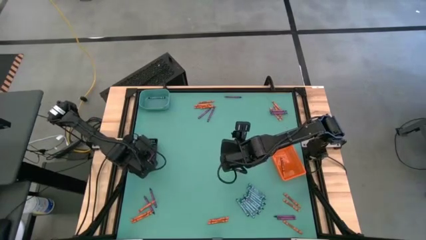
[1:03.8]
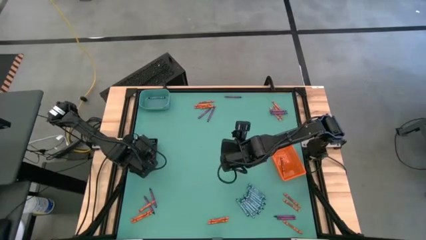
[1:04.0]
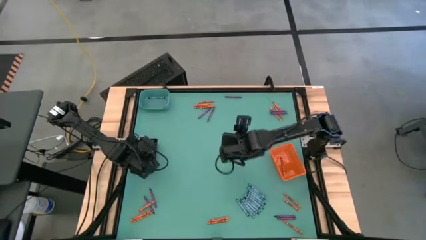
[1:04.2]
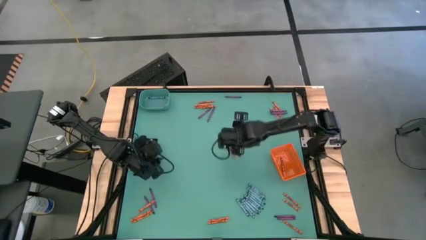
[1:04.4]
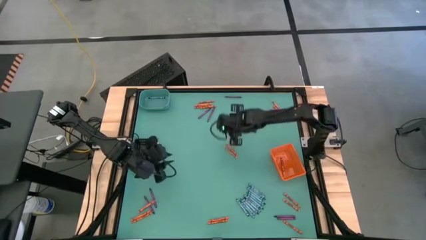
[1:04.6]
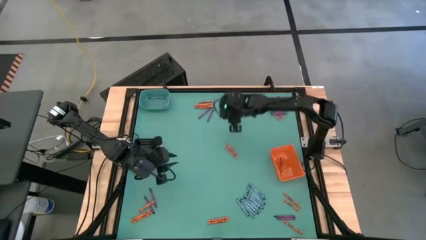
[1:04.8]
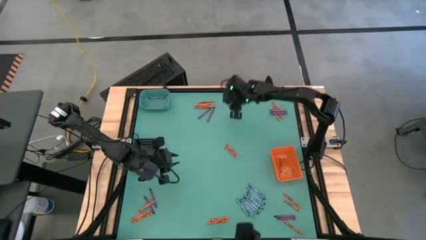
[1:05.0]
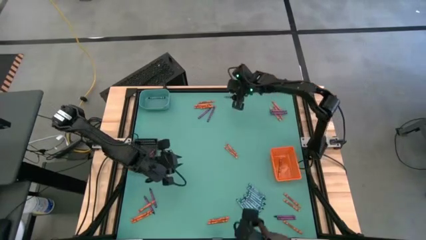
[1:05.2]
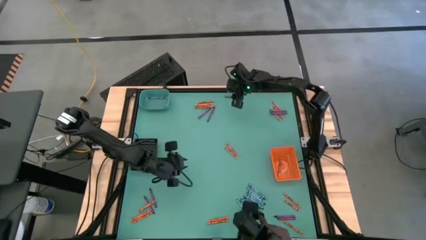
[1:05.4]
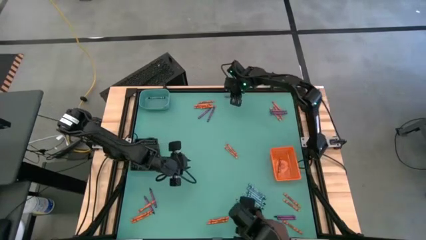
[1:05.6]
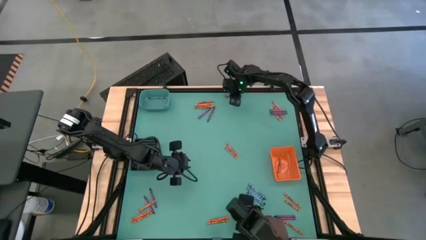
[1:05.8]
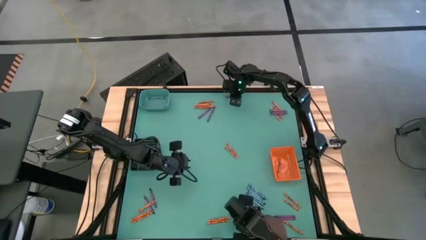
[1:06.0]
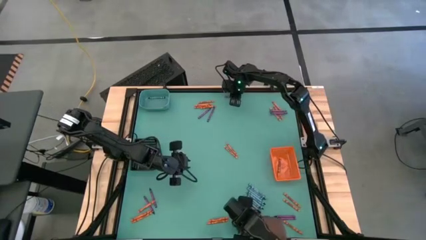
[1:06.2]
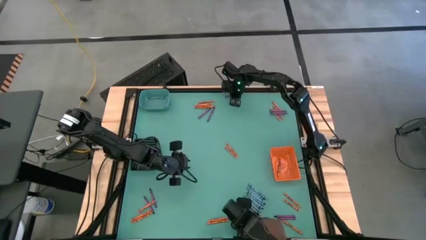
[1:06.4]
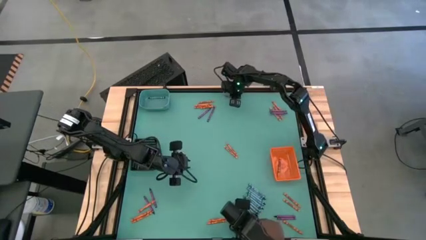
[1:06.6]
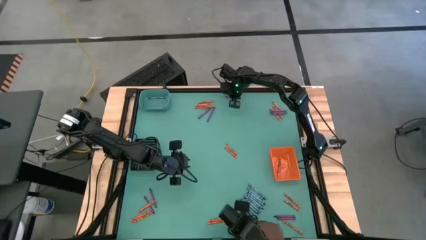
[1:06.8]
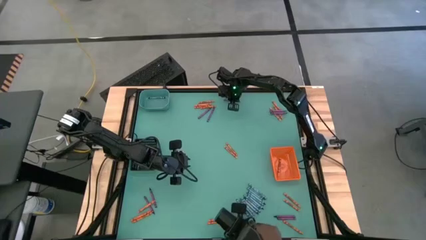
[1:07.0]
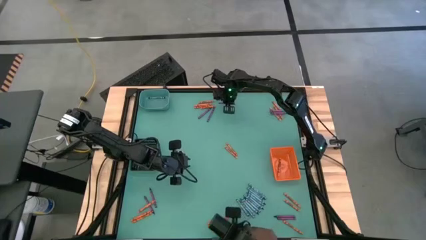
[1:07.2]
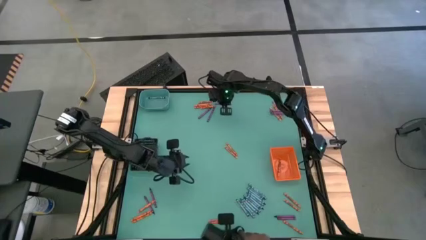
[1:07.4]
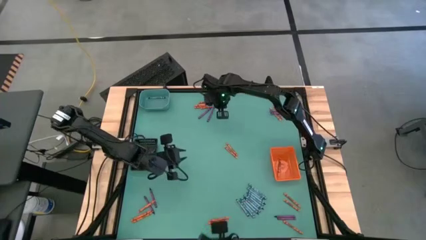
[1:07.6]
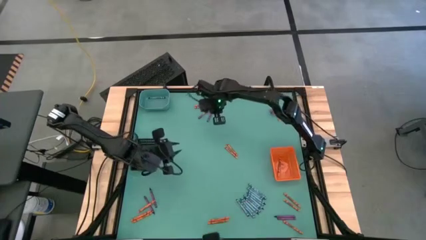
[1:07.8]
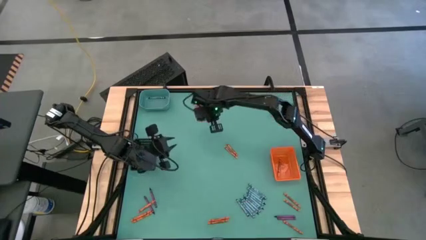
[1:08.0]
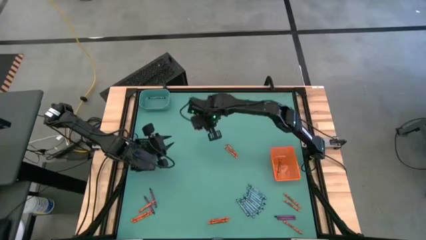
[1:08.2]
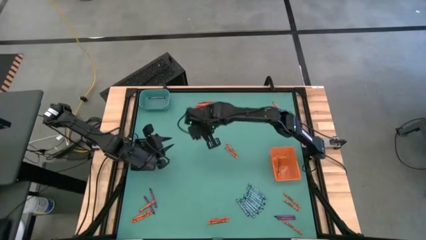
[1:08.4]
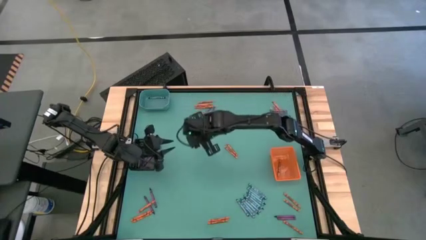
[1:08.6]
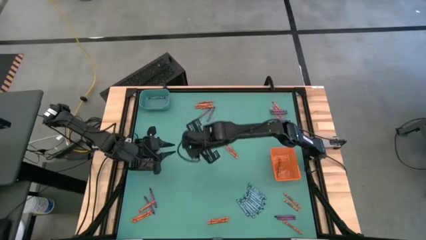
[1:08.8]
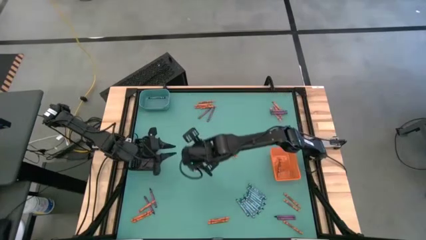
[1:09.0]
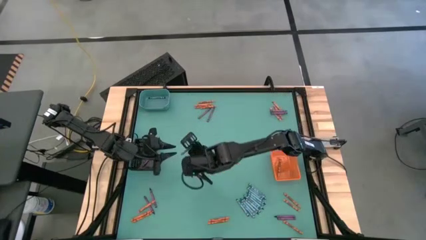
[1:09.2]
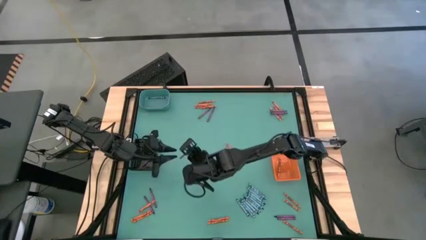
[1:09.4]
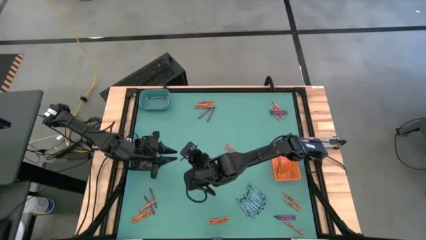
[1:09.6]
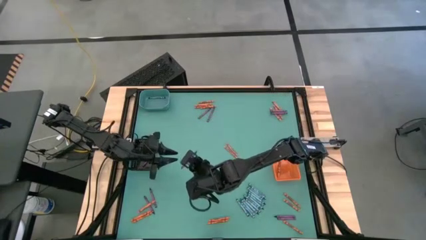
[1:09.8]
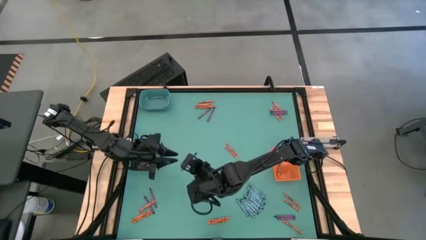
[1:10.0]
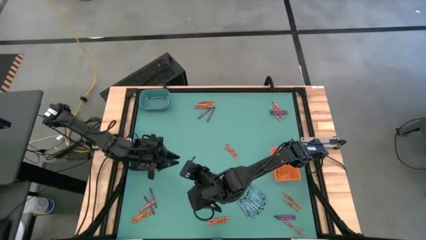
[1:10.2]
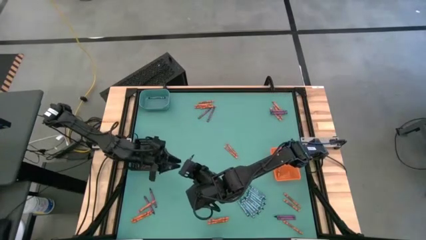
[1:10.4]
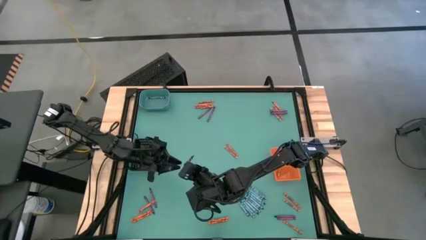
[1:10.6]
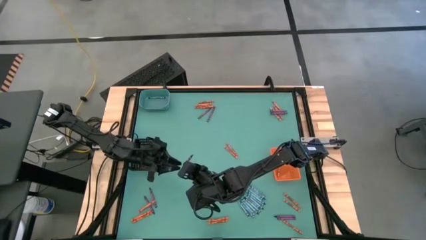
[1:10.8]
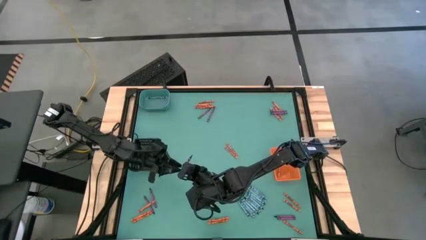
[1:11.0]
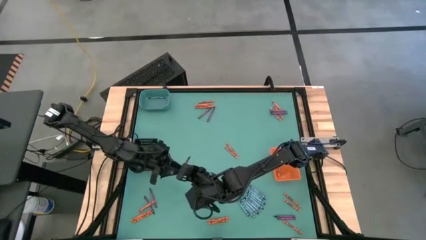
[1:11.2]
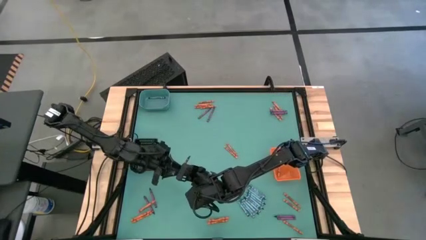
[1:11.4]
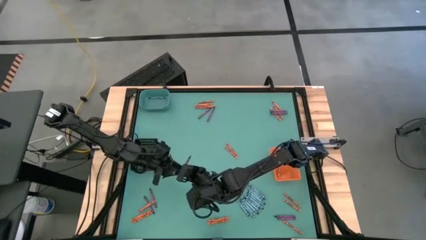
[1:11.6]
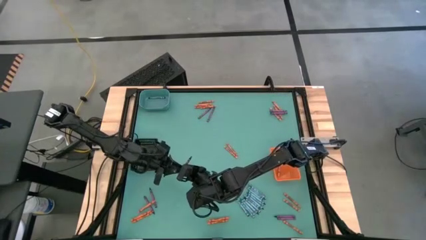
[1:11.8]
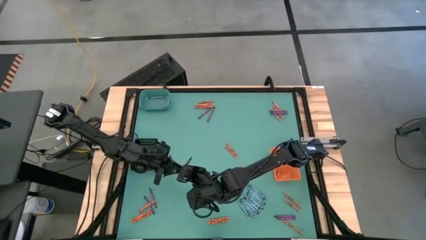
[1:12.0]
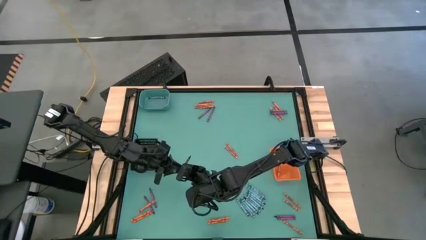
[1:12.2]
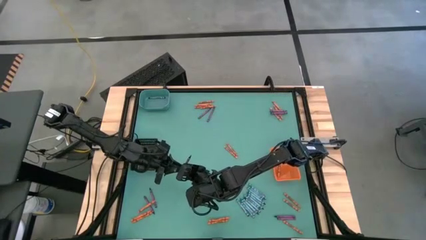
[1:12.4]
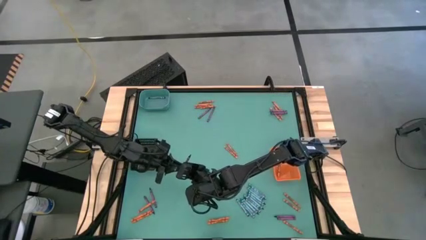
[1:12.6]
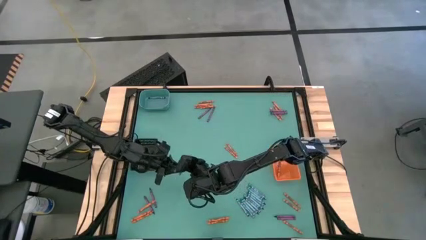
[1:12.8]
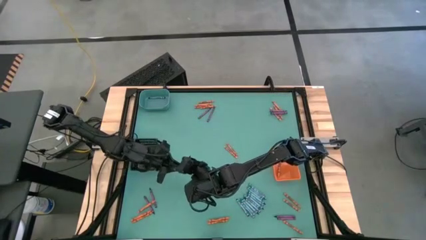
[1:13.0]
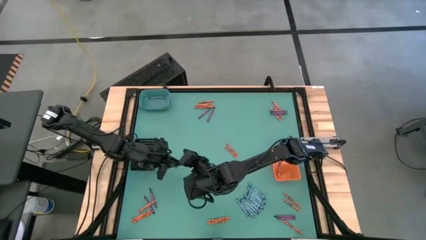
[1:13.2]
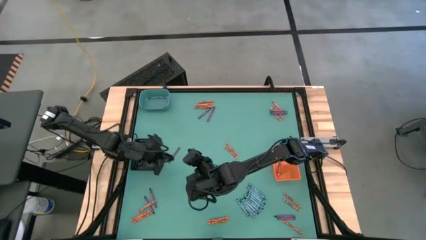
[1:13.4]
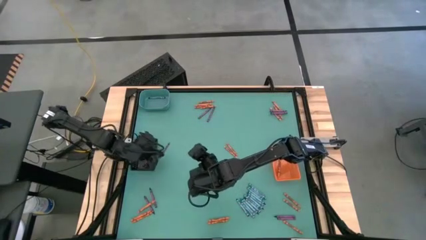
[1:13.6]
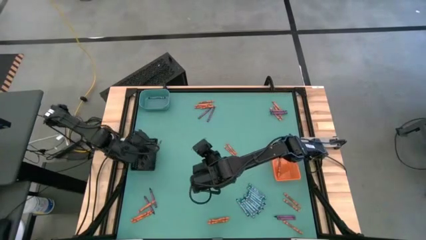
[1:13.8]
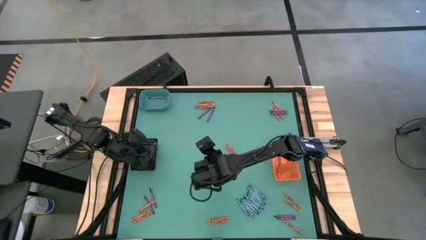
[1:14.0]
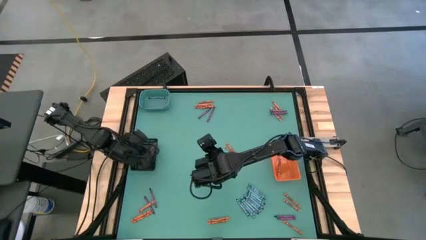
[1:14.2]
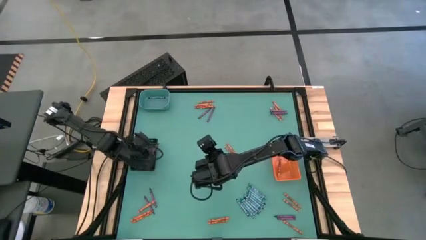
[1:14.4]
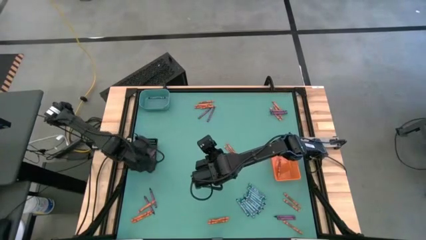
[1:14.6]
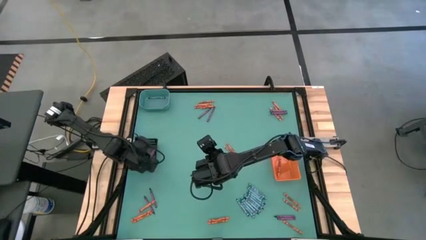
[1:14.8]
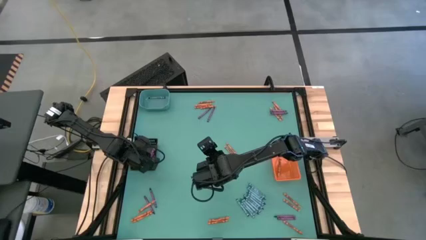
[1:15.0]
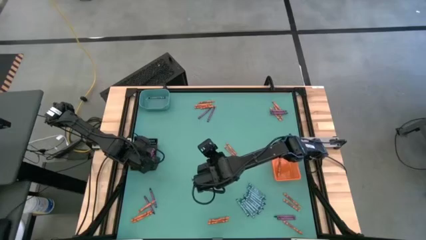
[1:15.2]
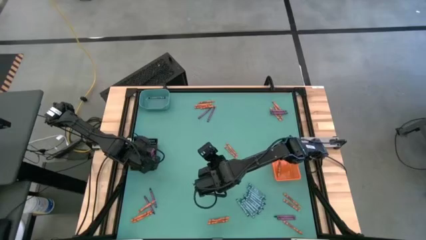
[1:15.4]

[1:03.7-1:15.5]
Task: Sort crayons
Put the purple crayon into the black bin

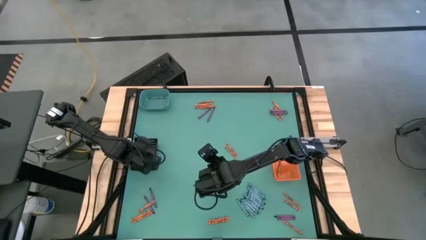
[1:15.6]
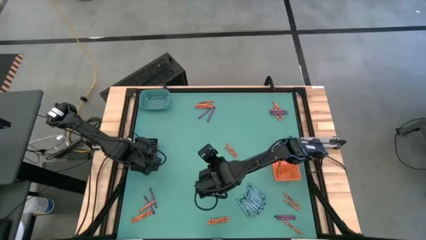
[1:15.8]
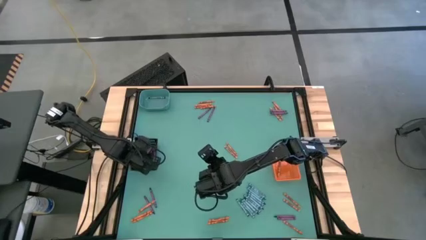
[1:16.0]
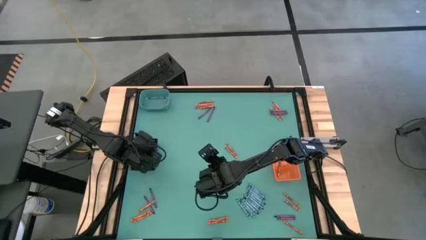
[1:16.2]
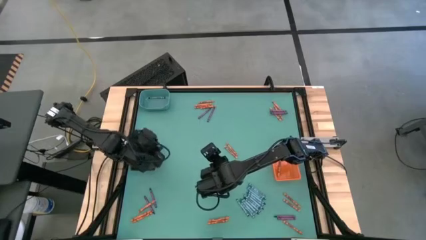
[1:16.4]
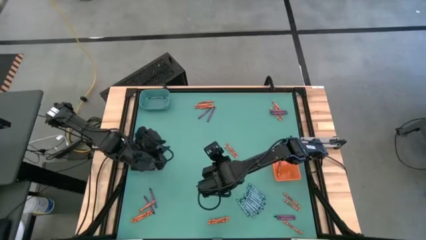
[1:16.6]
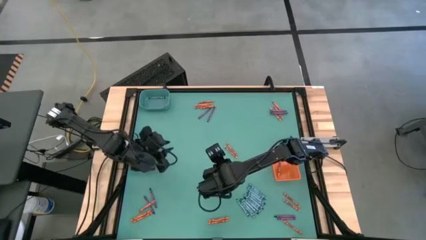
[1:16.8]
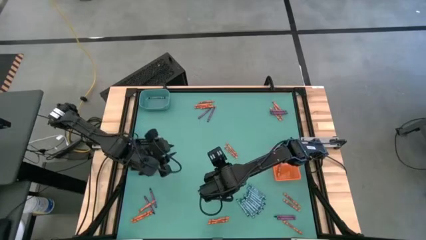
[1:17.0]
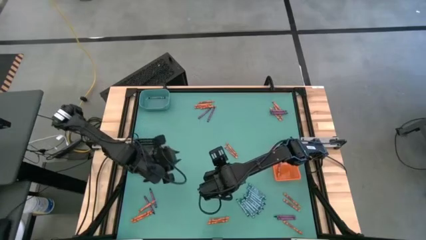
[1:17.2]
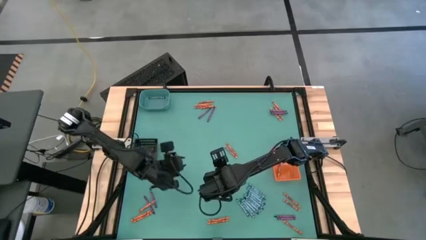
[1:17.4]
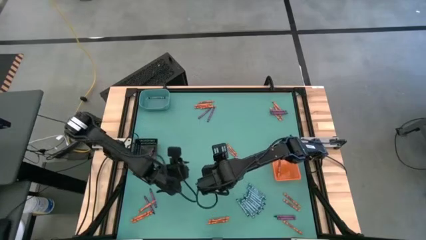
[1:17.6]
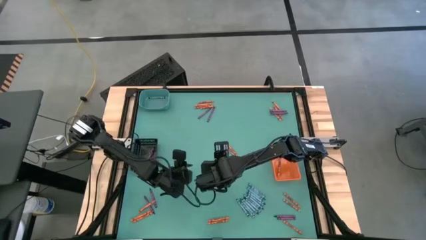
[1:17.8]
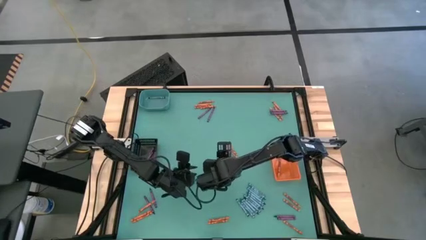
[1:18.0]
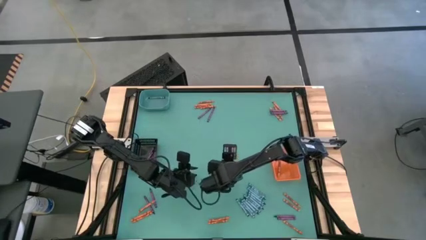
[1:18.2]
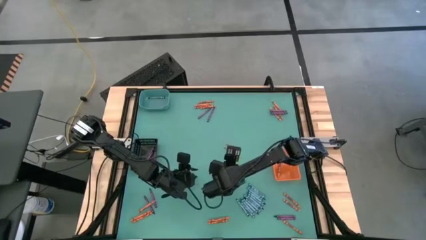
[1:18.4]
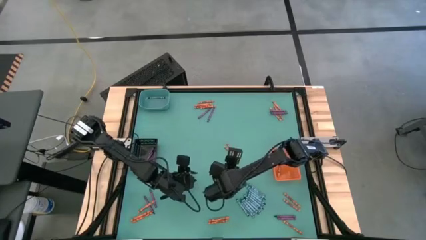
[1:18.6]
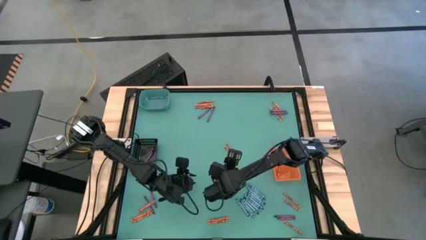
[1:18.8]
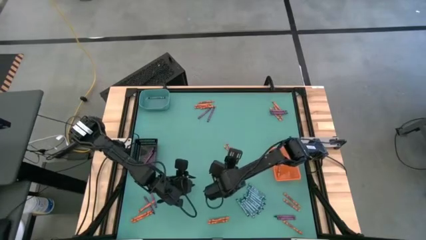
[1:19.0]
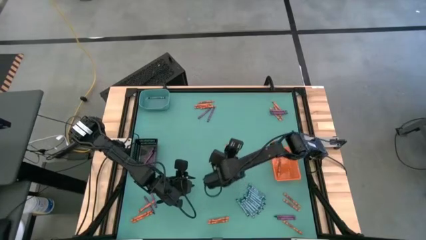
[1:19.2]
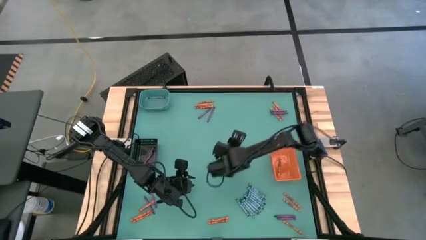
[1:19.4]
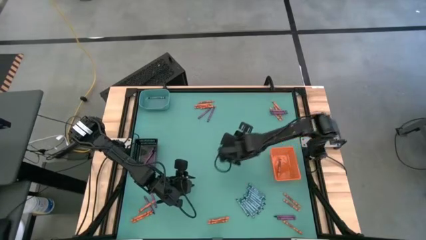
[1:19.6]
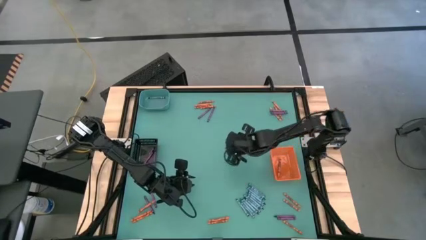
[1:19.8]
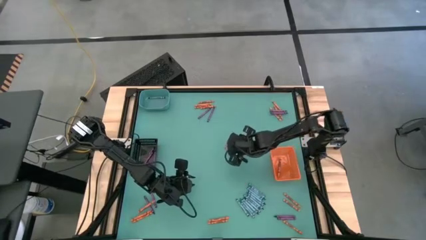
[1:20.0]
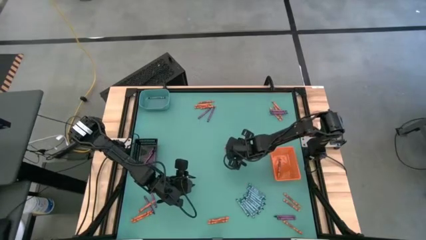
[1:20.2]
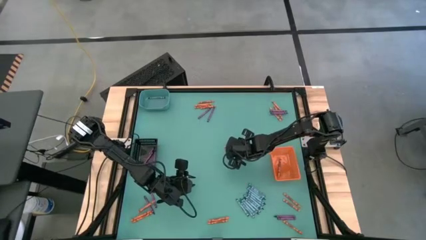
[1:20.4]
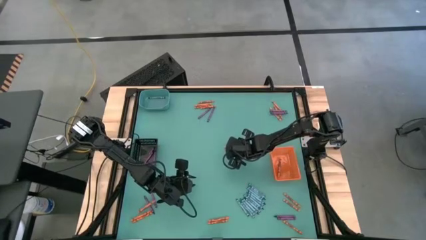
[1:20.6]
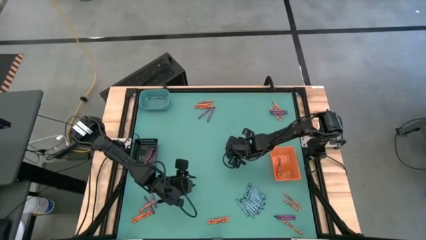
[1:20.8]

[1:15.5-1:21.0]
Put the orange crayon into the orange bin
